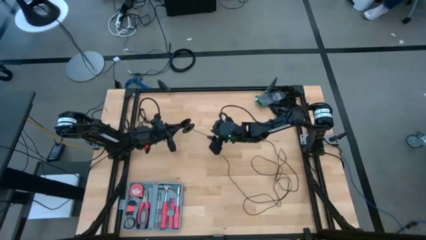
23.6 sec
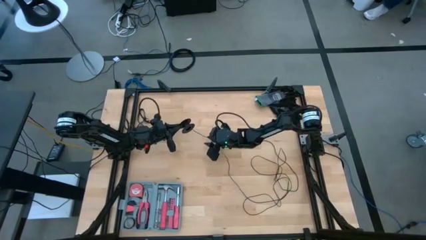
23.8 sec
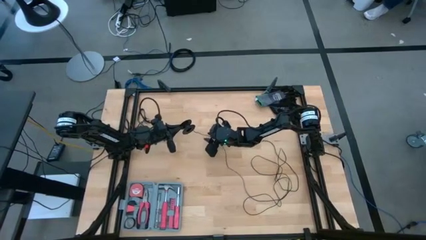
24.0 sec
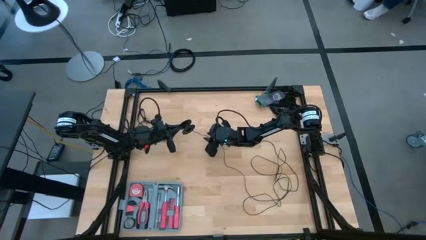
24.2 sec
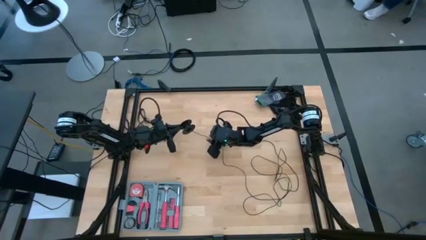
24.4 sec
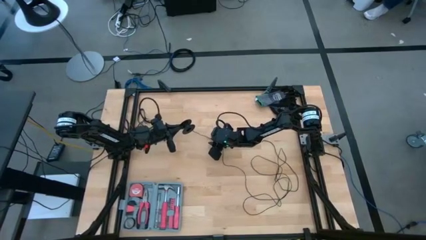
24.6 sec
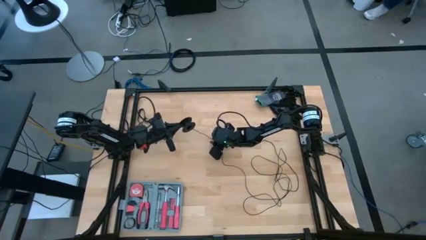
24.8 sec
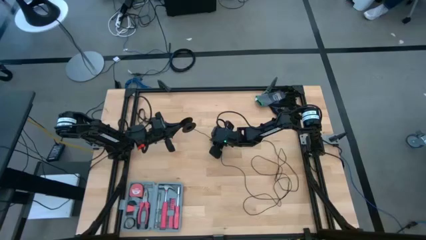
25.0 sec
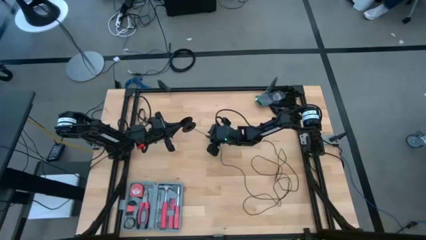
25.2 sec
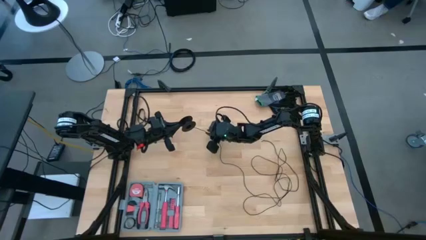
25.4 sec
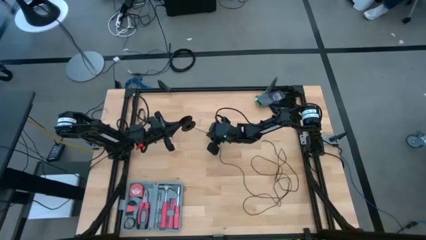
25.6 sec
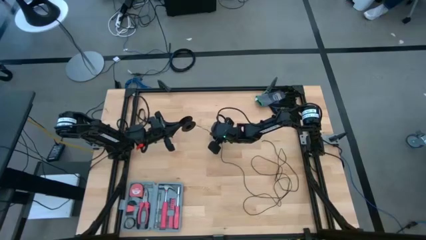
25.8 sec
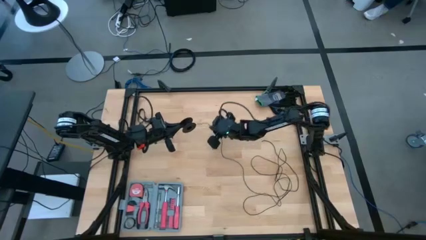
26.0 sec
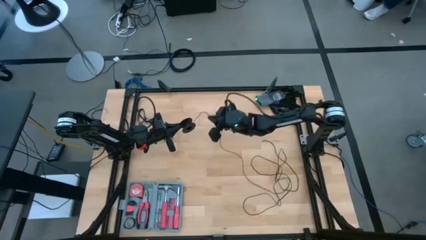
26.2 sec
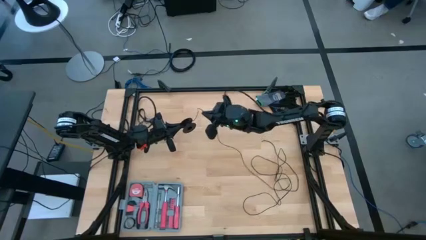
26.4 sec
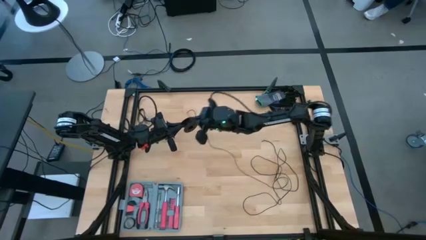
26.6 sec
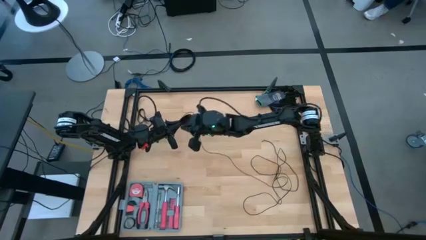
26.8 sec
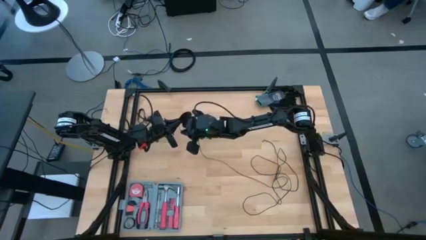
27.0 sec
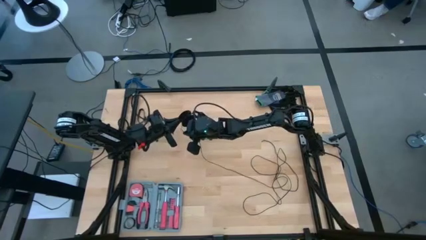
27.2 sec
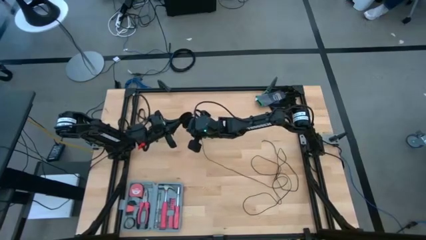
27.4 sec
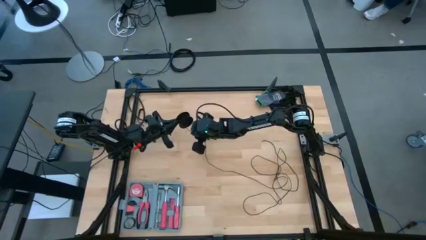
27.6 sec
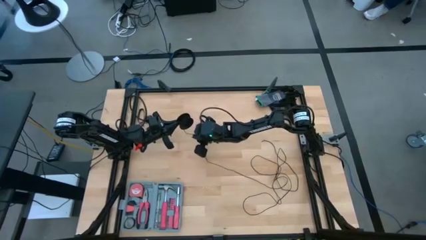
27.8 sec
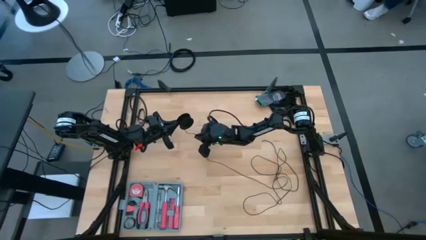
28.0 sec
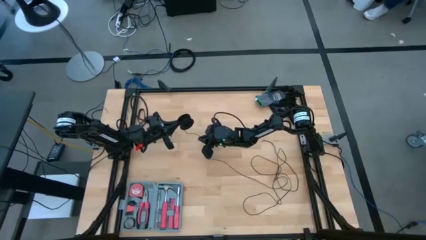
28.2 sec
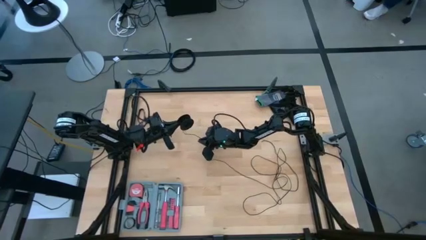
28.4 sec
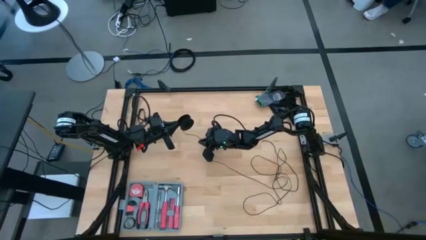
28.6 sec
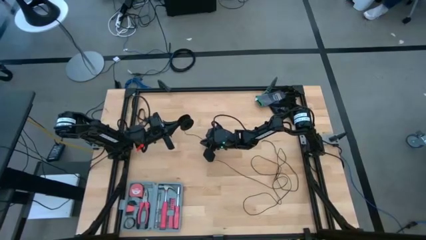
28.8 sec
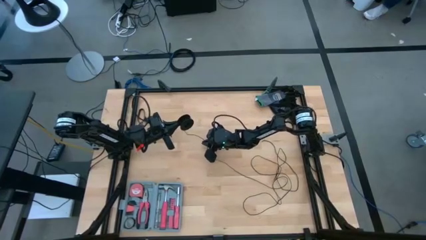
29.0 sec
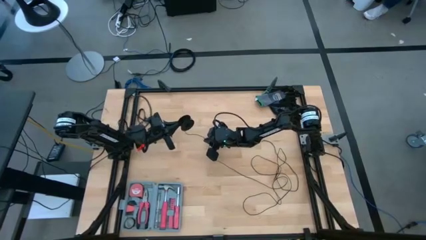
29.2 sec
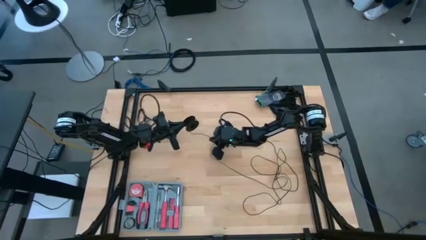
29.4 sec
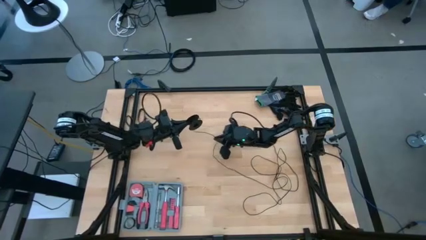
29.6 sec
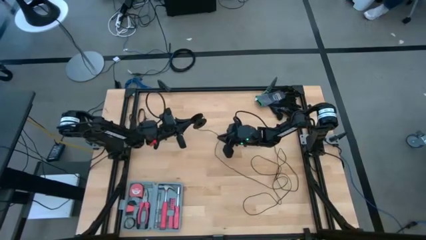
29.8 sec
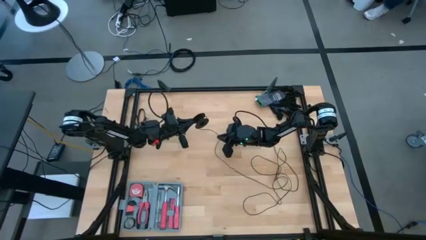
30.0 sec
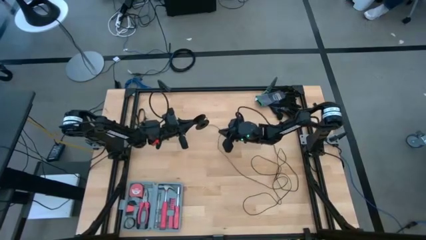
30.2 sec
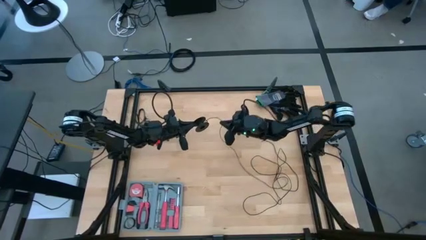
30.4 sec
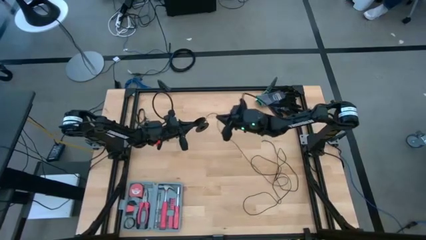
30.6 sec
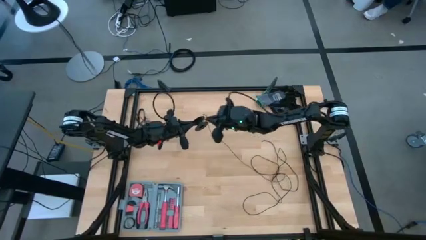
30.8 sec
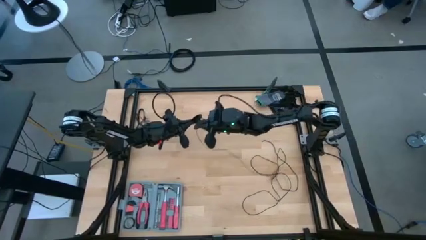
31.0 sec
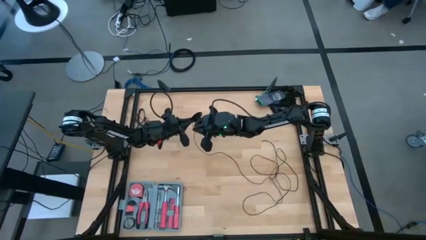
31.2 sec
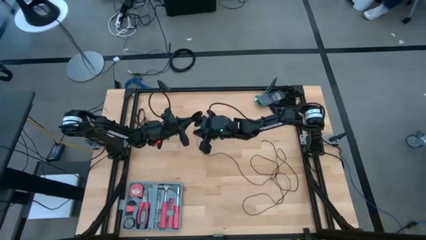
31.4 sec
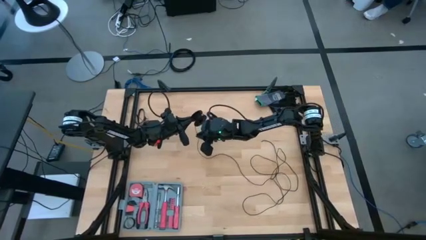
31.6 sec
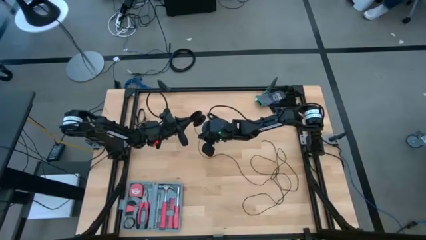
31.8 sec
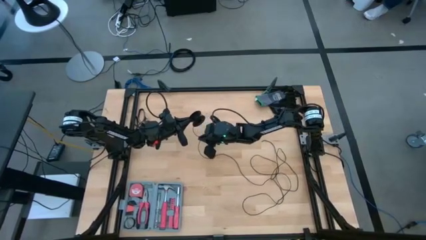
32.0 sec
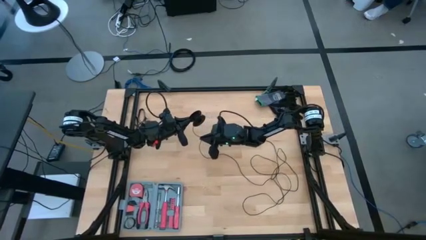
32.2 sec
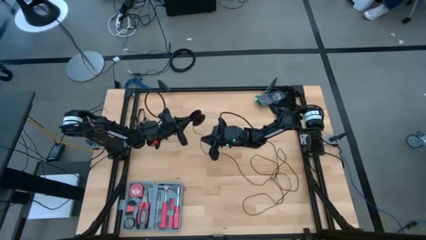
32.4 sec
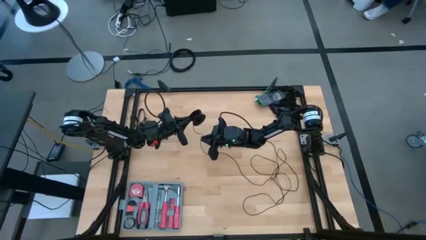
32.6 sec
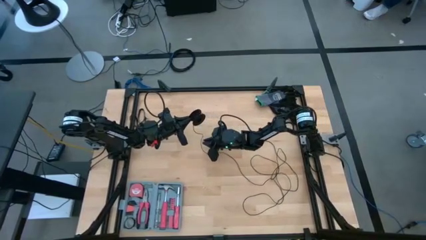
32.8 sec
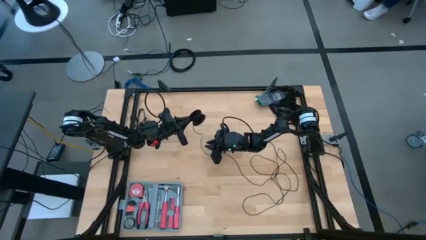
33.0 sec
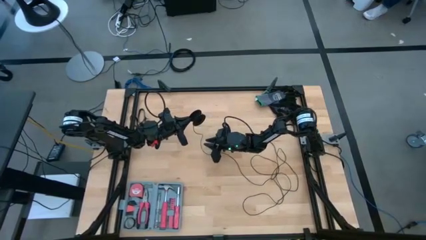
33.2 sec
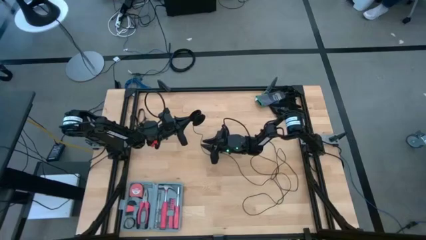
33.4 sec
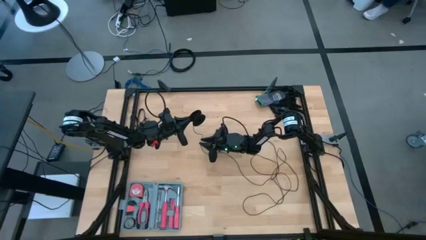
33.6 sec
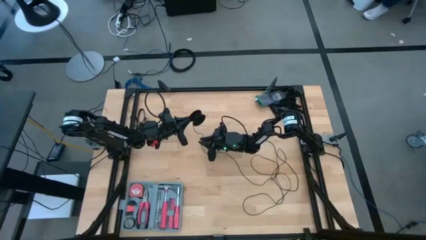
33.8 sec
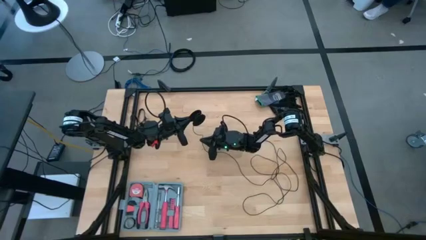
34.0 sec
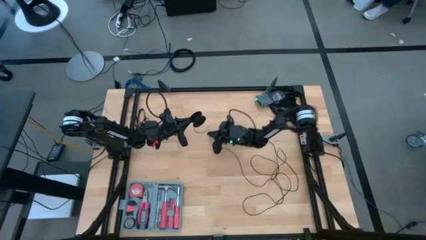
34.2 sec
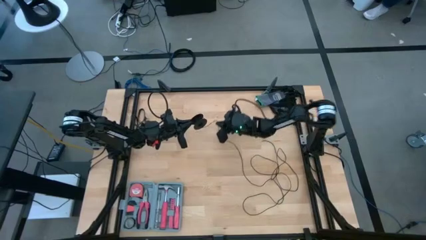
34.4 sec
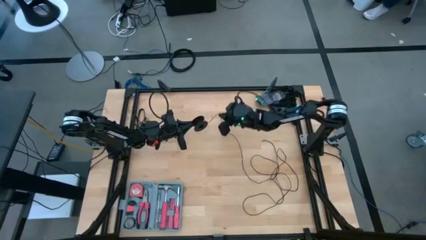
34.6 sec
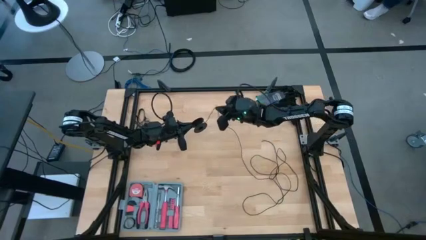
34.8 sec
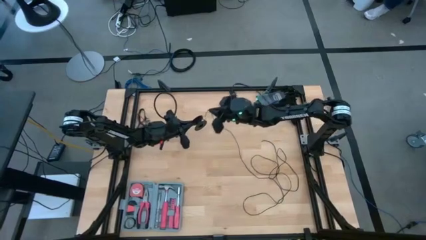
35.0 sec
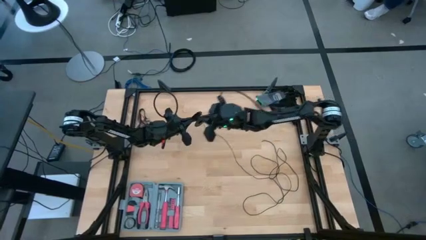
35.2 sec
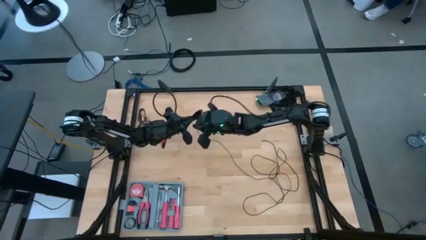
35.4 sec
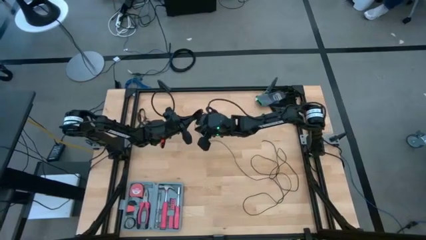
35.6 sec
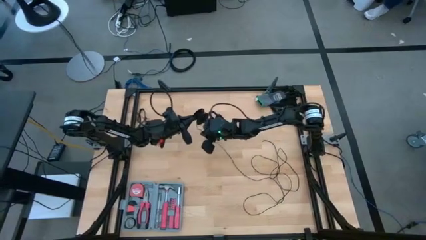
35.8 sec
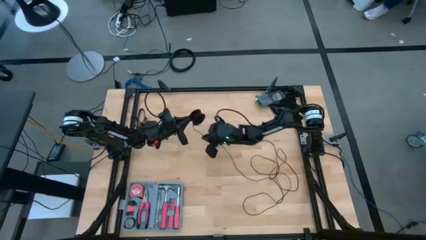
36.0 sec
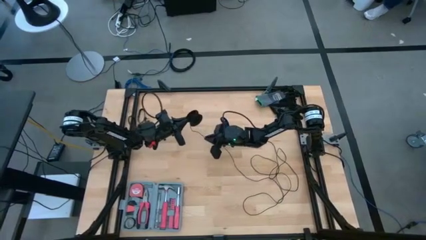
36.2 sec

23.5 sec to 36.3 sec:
Task: Coil cords
Coil the black wire on the spool
